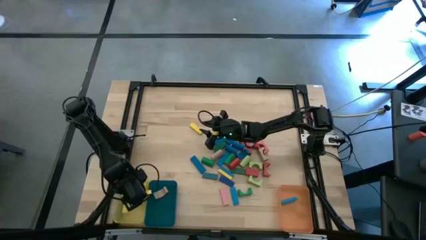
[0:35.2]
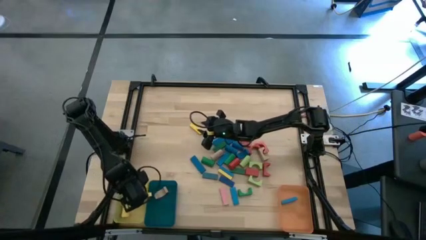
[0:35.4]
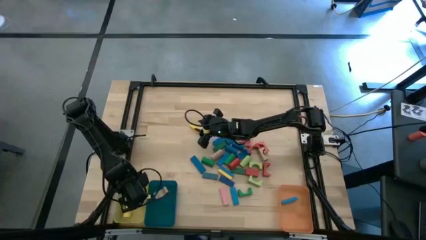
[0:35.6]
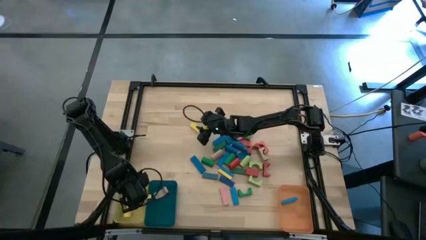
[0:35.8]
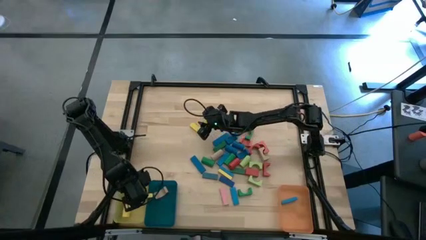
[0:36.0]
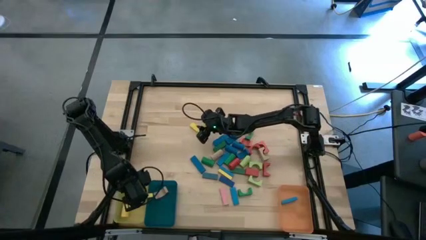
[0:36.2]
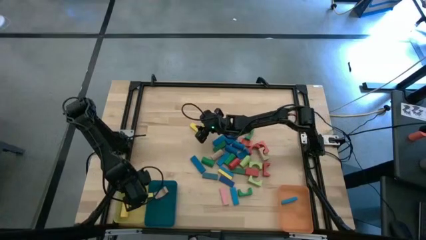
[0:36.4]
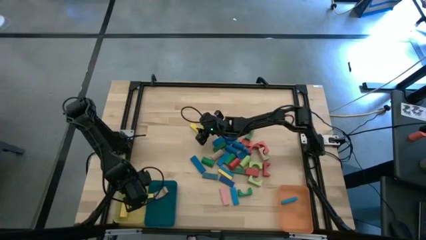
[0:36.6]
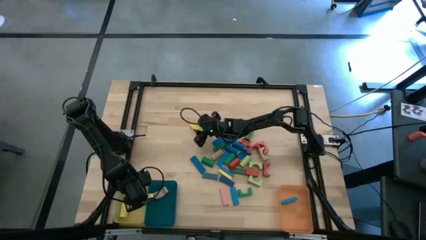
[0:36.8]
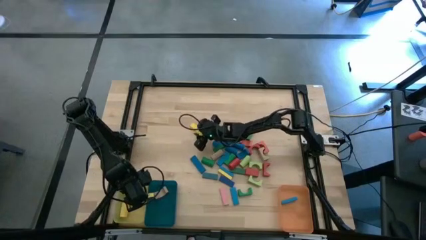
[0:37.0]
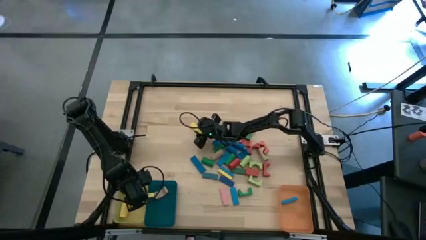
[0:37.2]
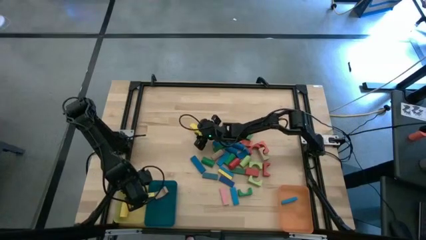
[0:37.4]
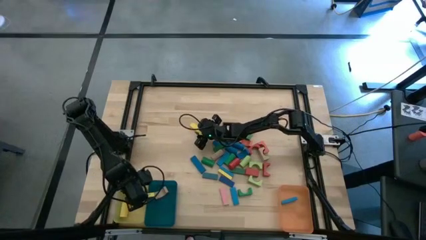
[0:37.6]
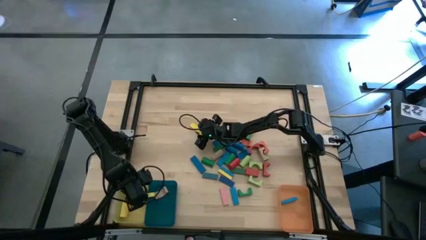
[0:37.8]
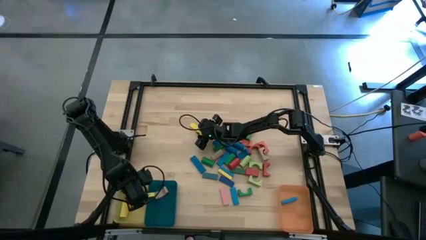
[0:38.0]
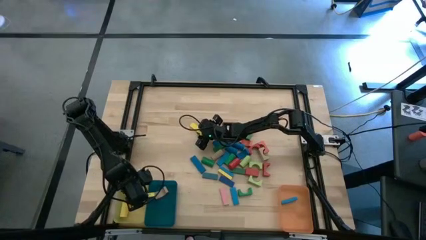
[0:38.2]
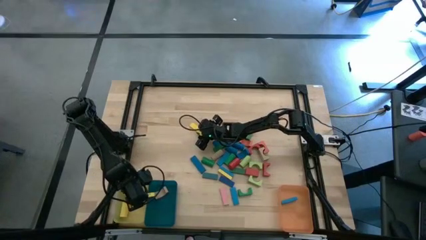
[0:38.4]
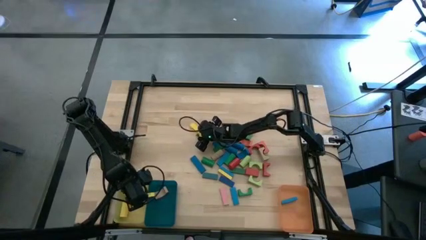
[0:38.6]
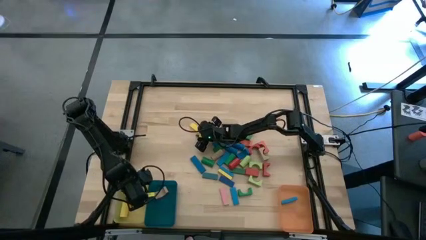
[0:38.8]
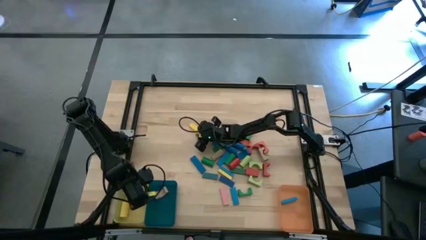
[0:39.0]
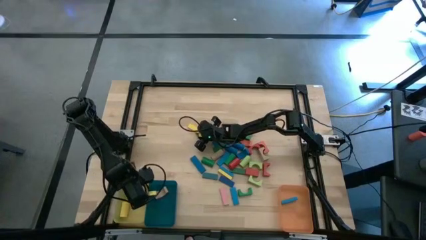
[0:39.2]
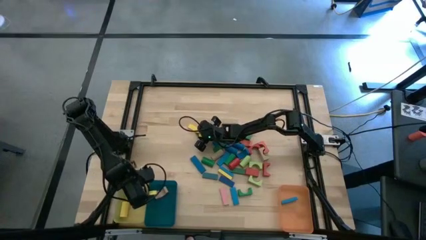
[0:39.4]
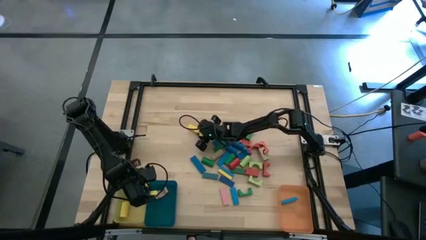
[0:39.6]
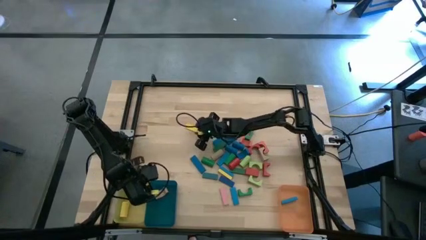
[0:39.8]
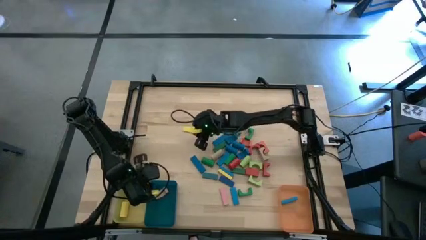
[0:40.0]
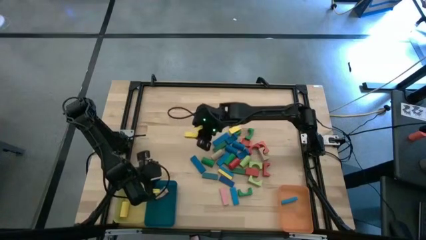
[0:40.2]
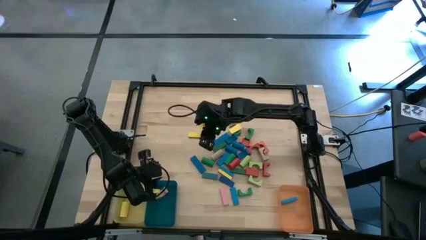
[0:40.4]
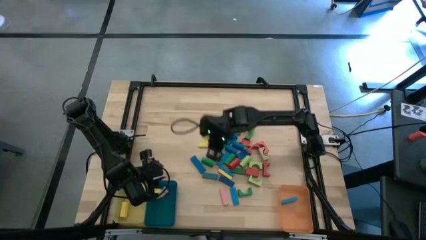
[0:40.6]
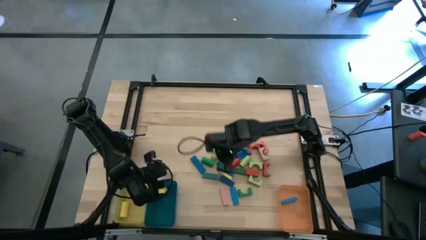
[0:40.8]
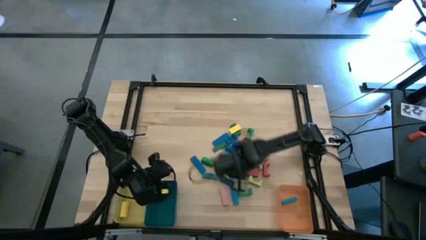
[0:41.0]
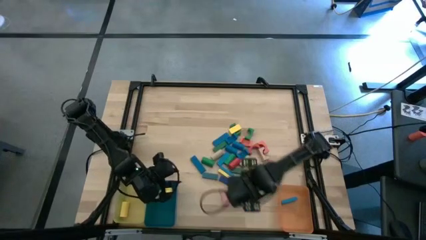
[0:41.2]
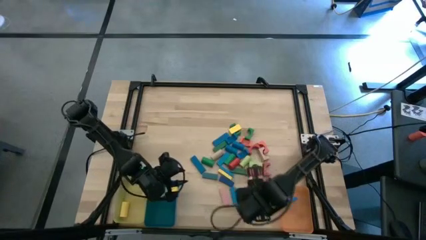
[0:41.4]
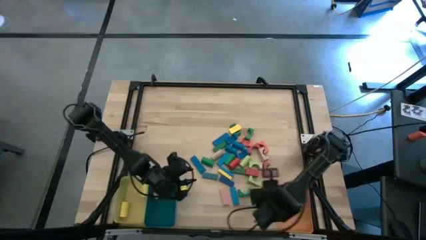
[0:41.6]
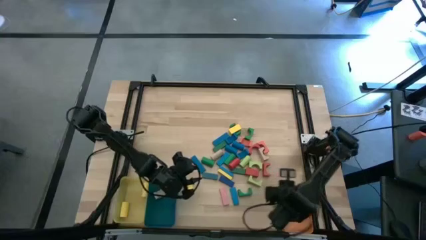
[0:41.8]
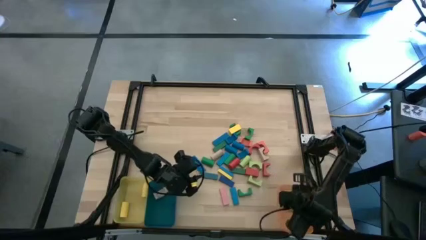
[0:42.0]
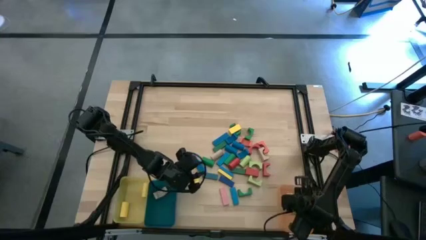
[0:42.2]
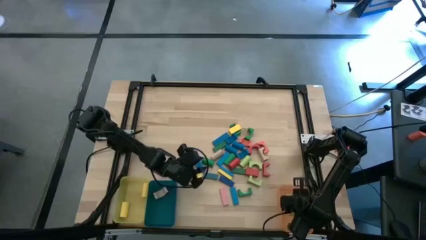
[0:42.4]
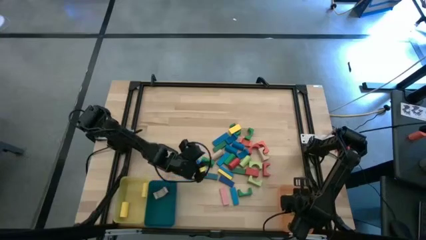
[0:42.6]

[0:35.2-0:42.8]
Task: Sort blocks by size
Put the yellow rectangular block into the orange bin

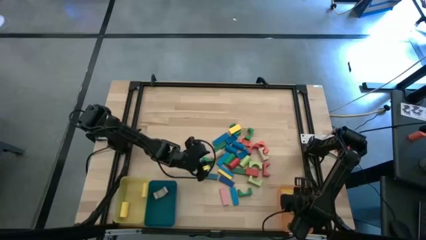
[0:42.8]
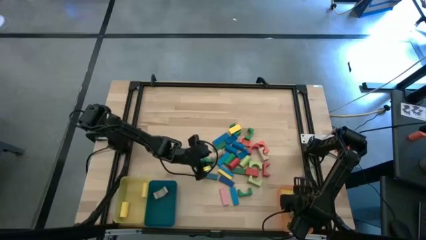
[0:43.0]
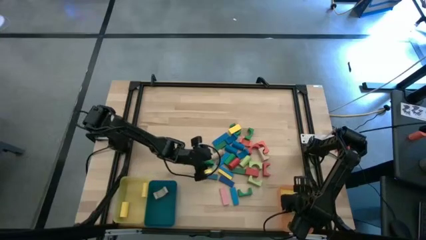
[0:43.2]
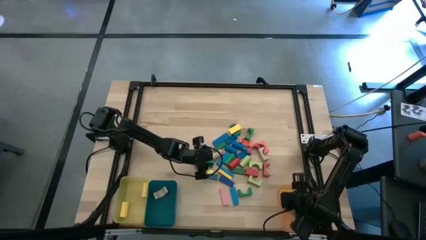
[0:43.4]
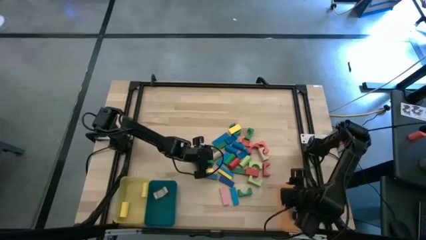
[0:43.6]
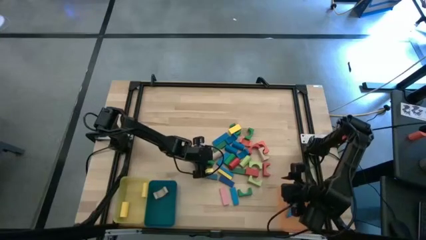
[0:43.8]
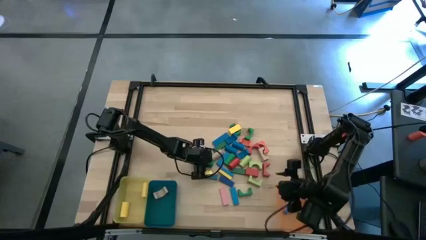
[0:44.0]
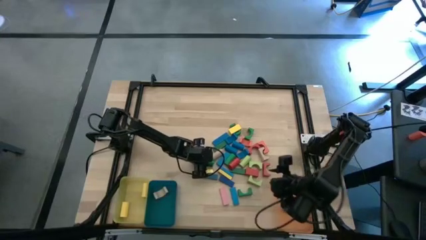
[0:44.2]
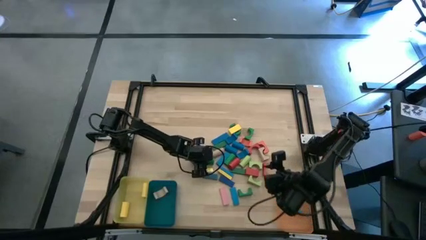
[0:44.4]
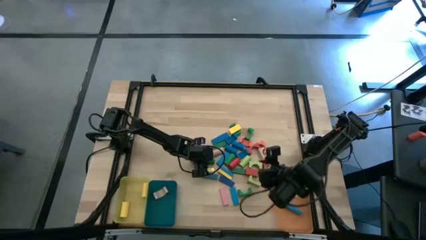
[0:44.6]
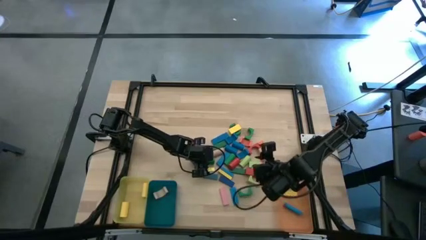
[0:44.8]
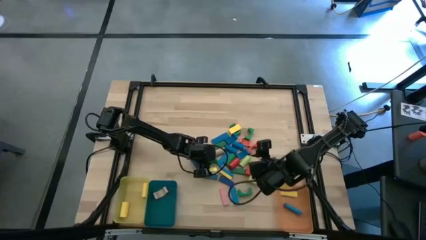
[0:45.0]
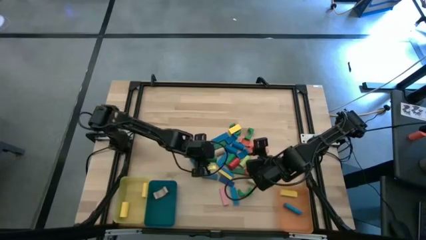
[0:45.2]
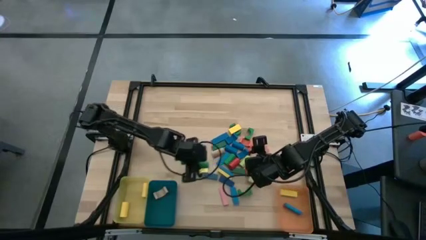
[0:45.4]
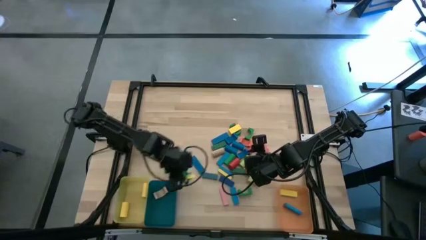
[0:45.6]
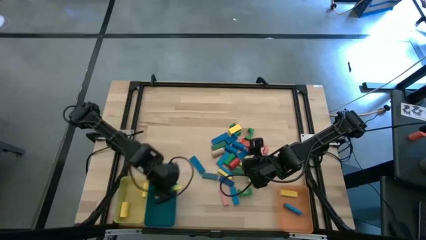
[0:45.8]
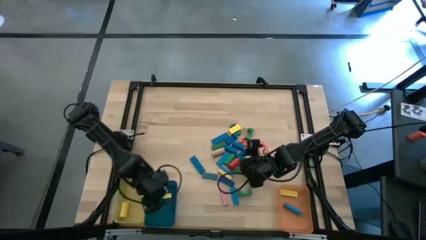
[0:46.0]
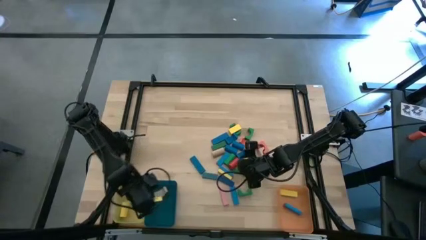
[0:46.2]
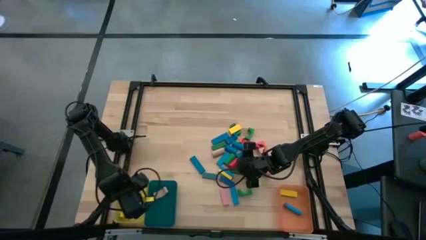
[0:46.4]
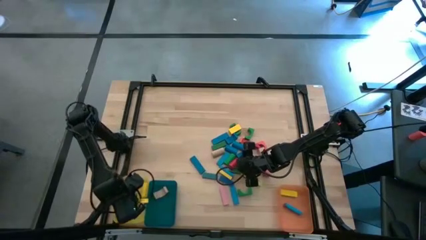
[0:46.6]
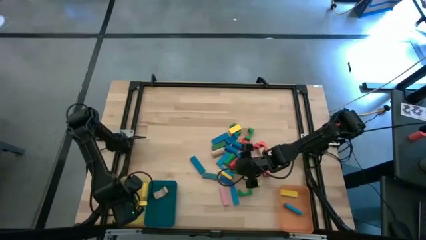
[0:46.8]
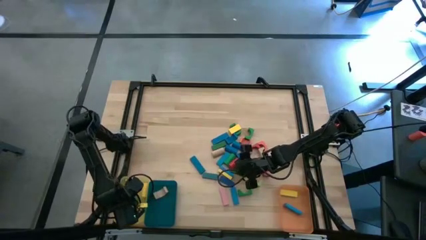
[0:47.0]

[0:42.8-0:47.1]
Put the green cylindrical block into the yellow bin

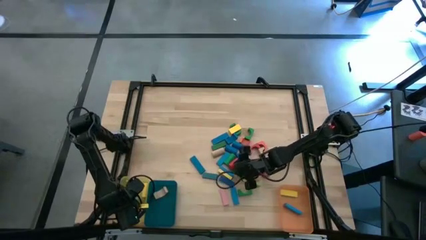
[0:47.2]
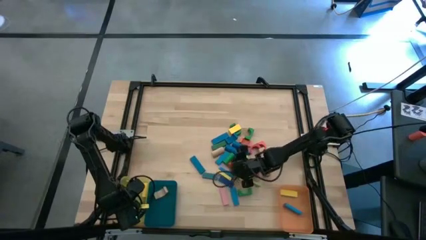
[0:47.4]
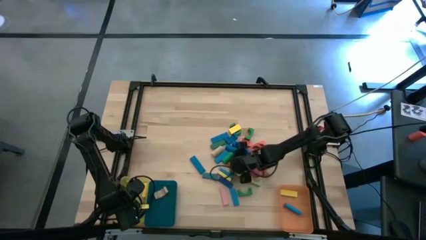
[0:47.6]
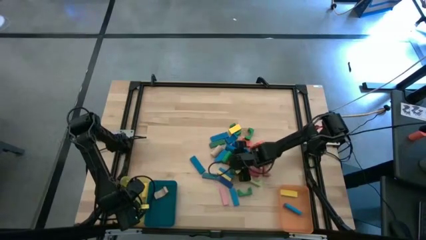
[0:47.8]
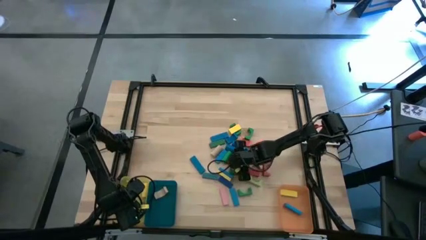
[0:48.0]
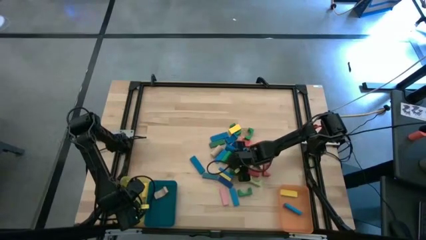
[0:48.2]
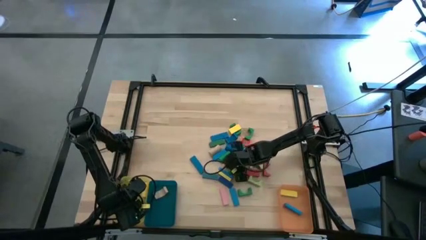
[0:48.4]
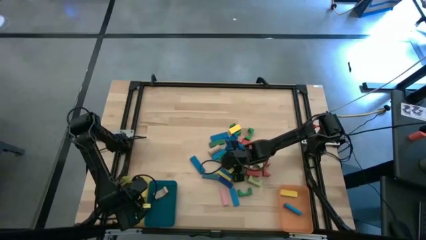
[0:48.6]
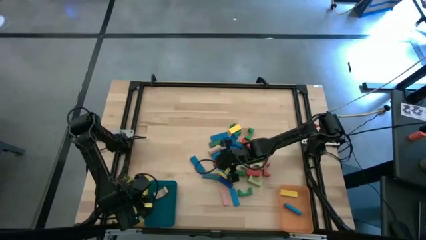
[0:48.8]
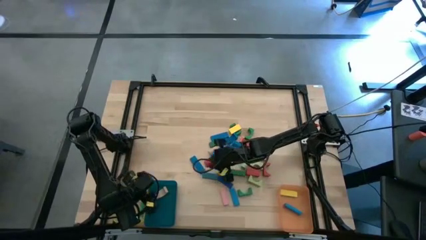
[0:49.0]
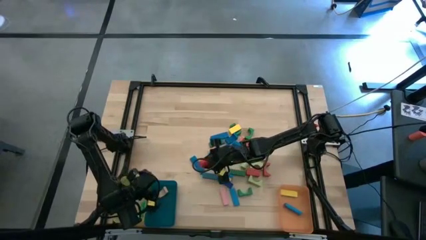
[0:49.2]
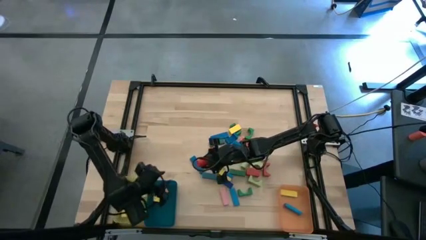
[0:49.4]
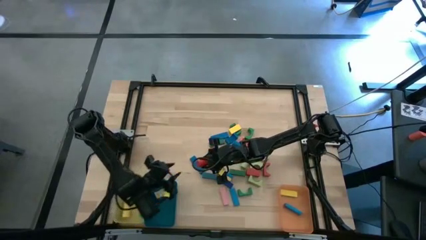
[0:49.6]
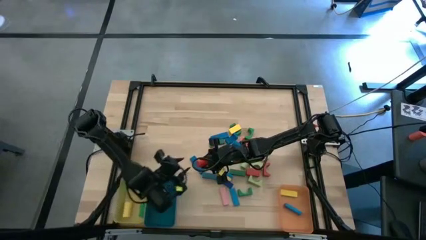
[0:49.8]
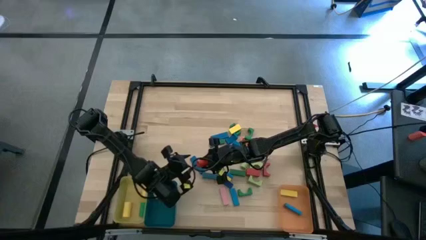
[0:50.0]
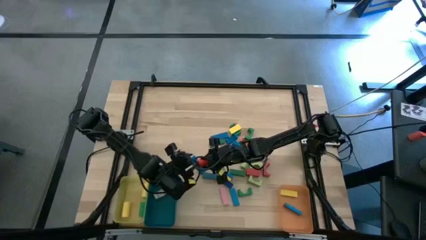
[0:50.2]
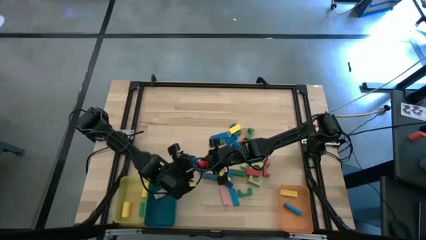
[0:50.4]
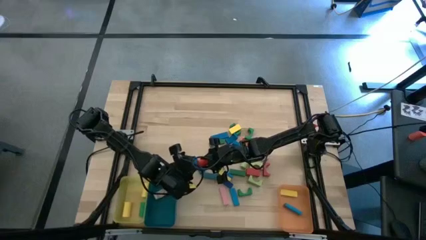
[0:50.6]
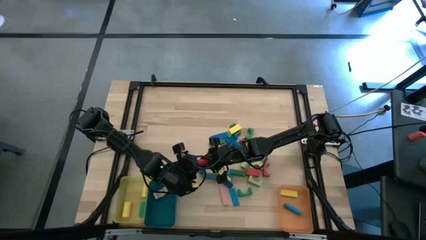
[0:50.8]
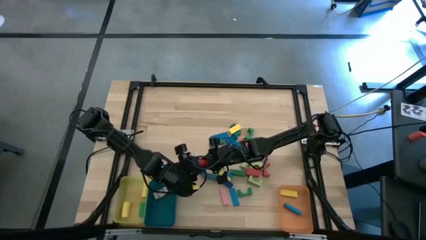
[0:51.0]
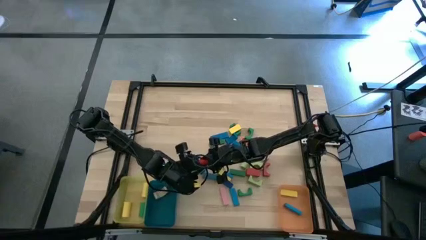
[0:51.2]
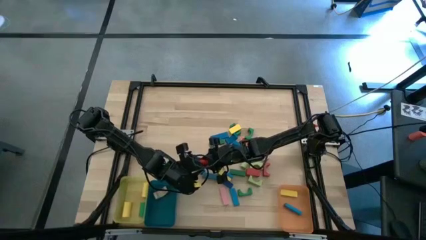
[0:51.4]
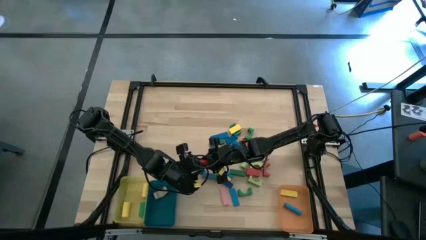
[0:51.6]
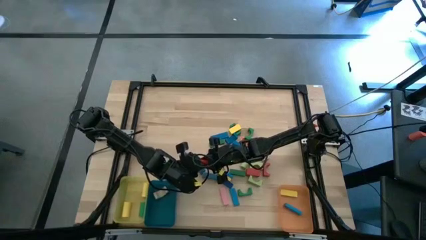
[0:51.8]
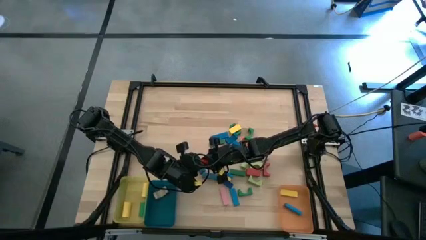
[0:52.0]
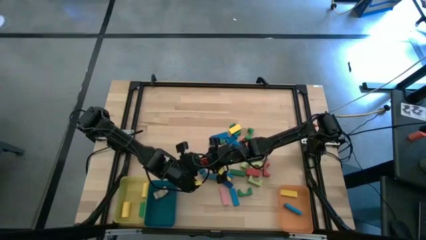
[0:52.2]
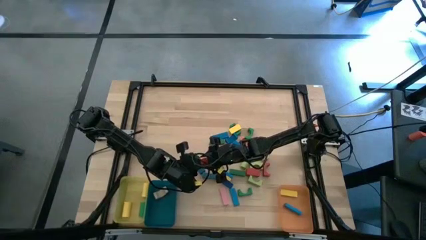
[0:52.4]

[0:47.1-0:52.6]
Put the red cylindrical block into the yellow bin
